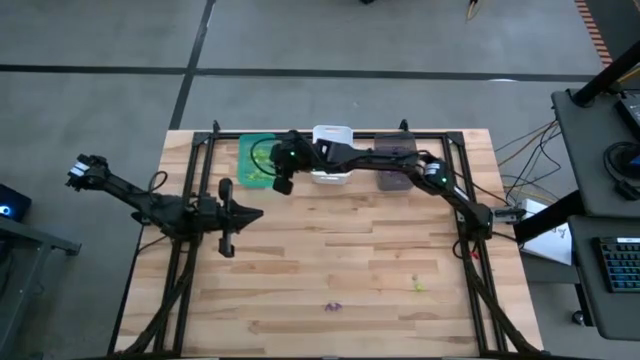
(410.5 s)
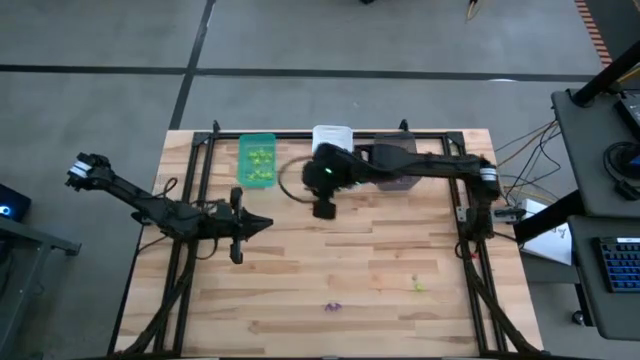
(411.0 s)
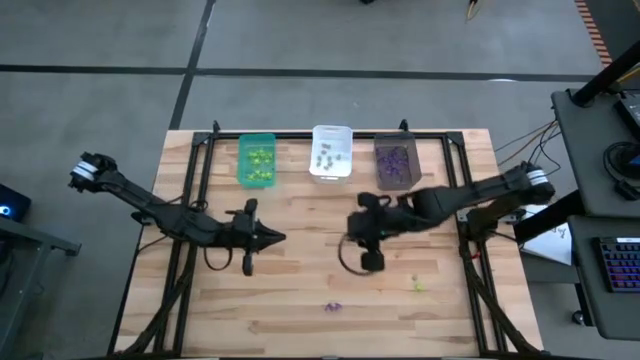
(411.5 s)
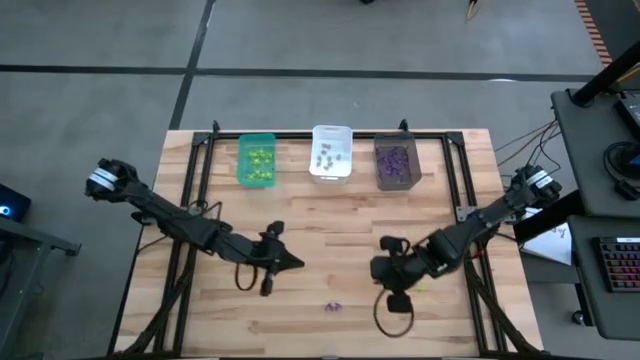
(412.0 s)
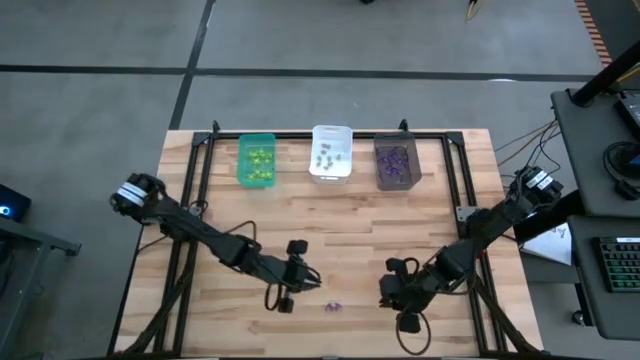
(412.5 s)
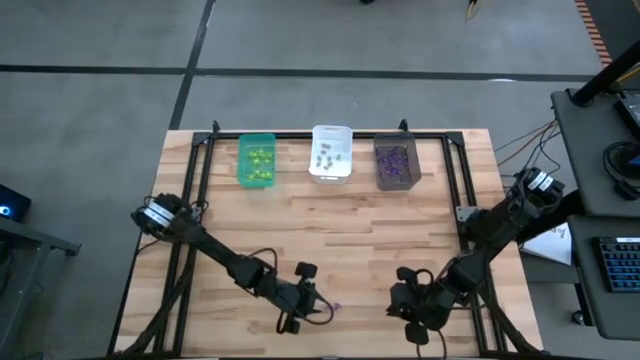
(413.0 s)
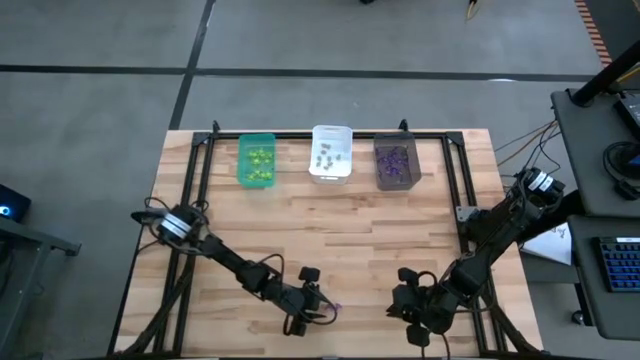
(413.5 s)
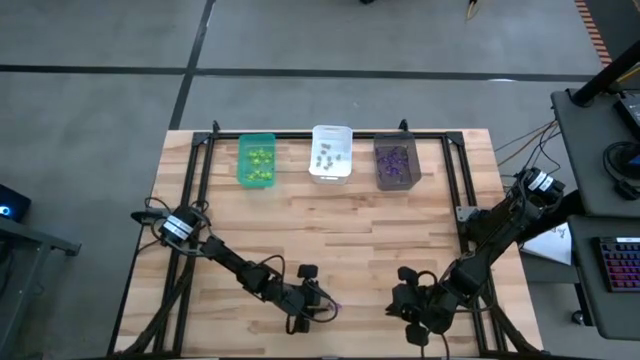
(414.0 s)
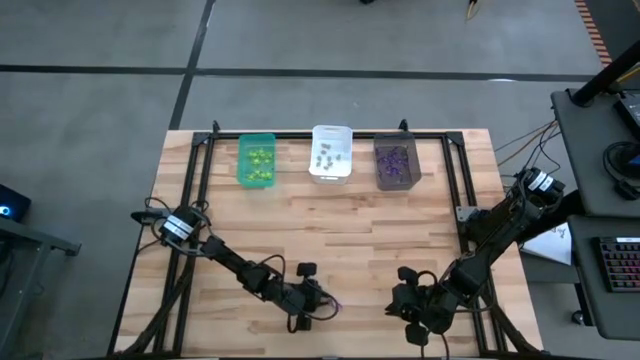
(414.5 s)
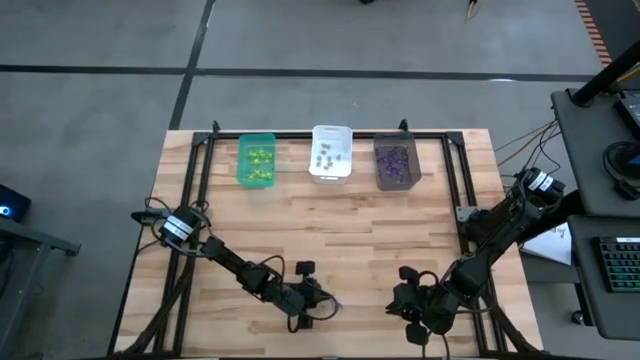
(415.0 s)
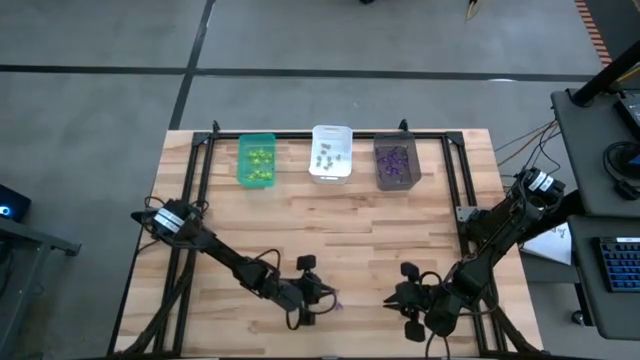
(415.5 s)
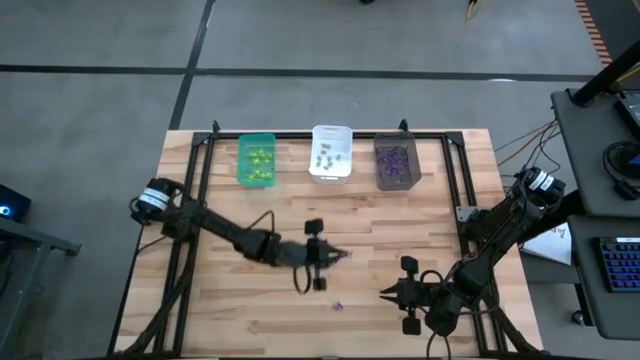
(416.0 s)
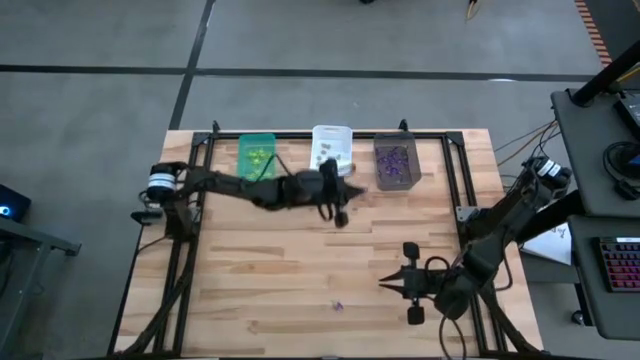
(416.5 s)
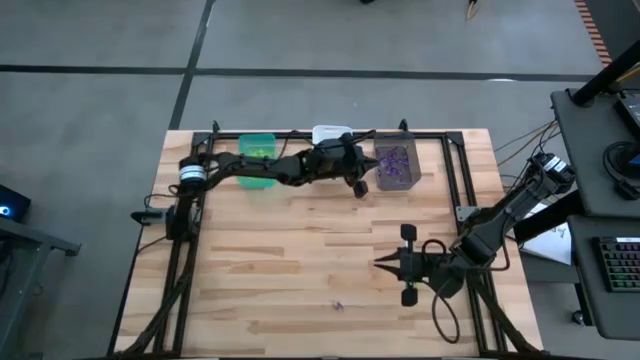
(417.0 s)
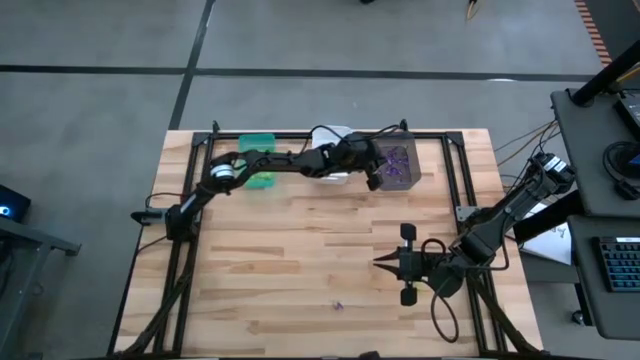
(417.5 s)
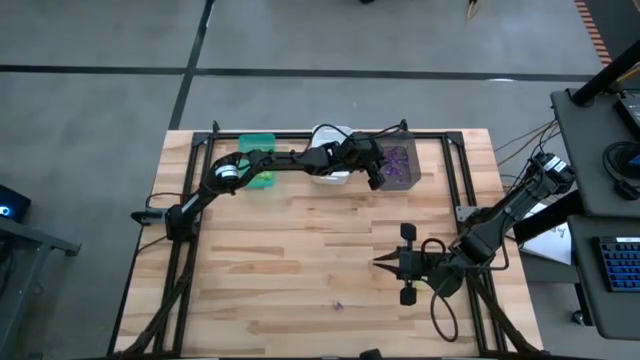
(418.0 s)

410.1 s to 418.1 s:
Task: Sort Halloween decoration
Put the purple witch hat toy into the gray bin

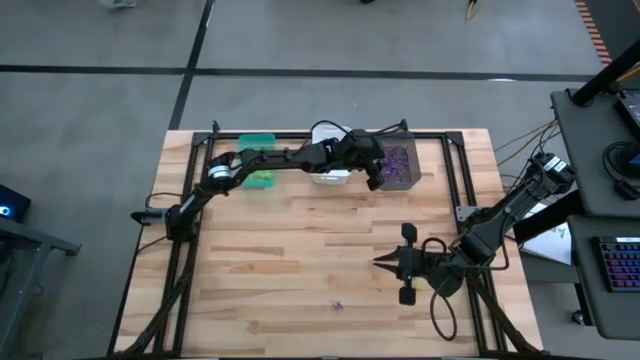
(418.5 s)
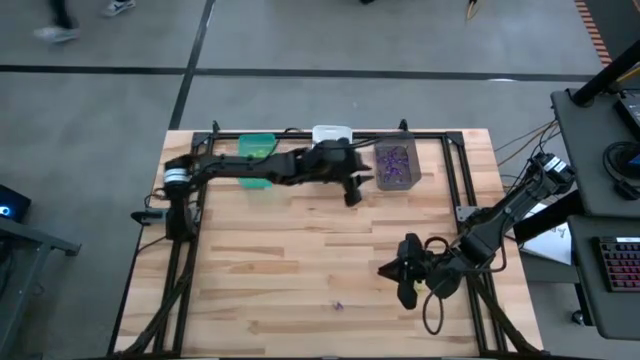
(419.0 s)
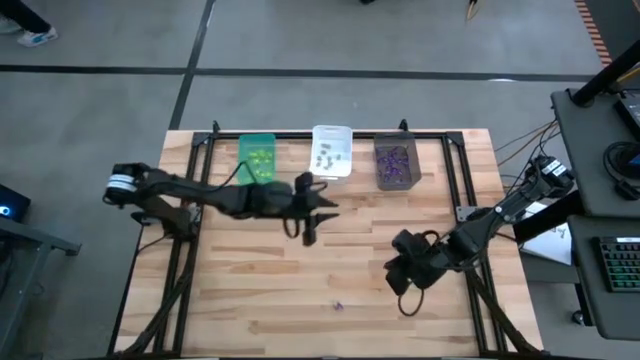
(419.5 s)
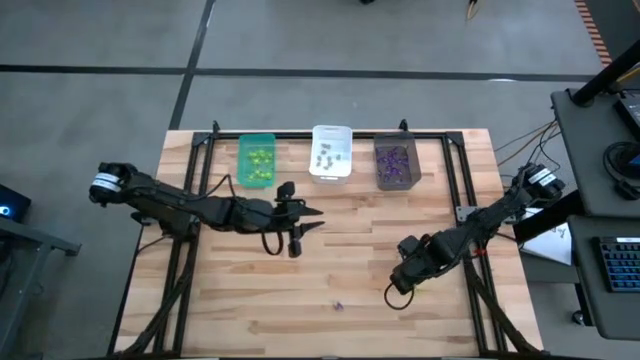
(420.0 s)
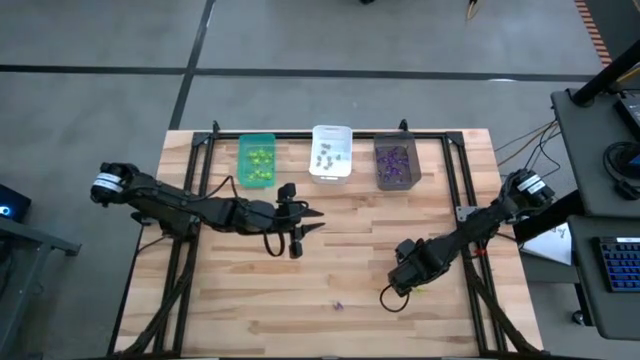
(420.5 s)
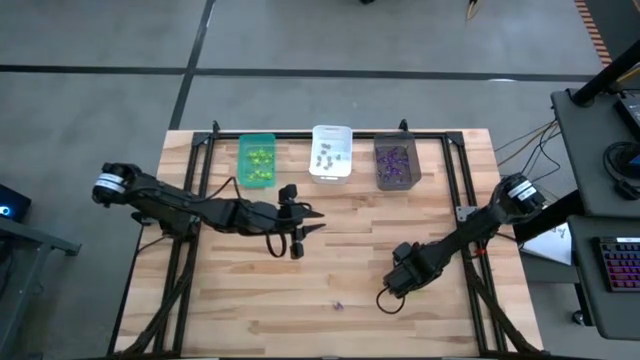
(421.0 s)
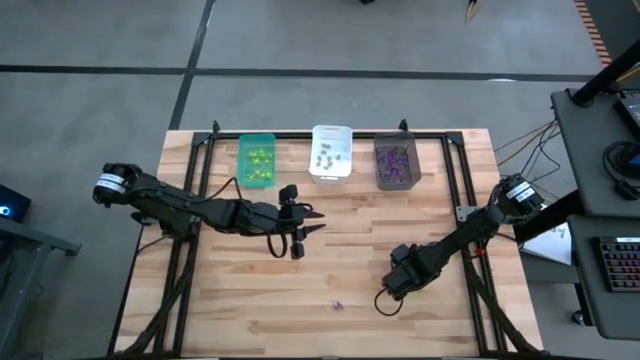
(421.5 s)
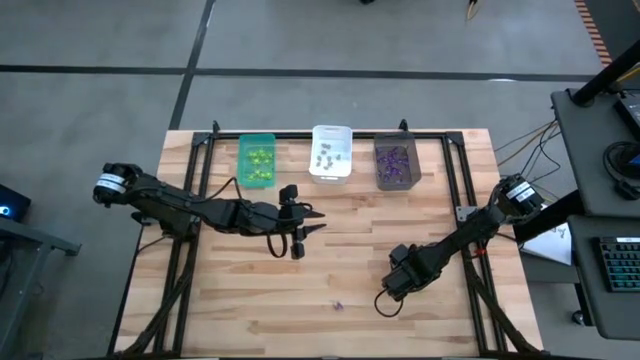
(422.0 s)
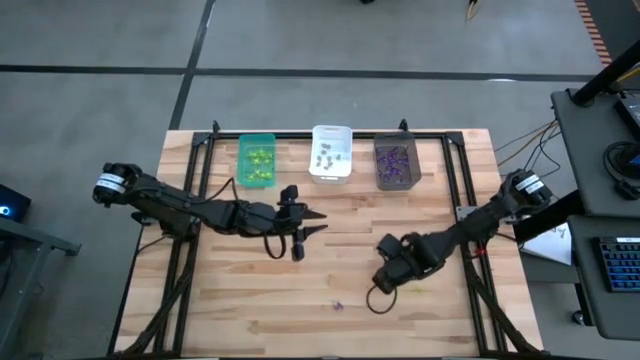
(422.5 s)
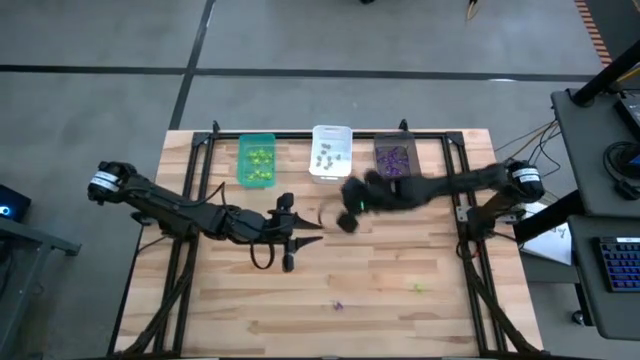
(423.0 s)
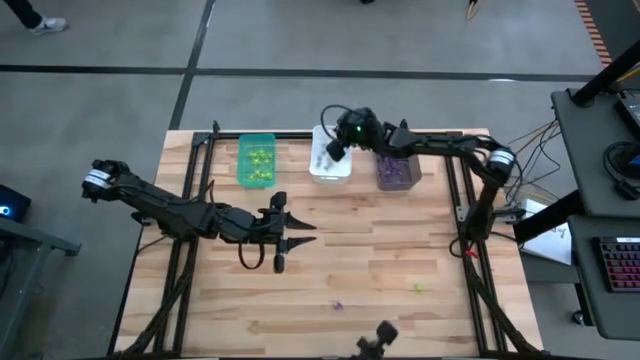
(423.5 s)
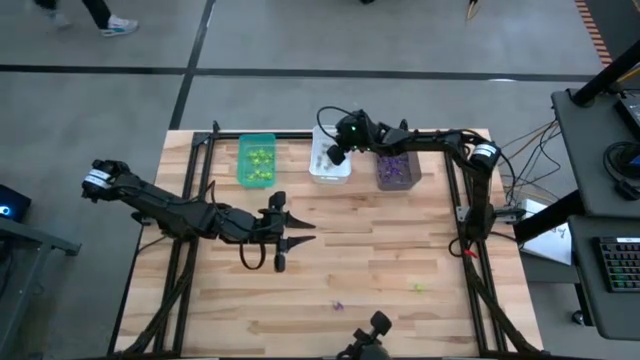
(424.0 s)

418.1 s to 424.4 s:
Put the white skull toy into the white bin

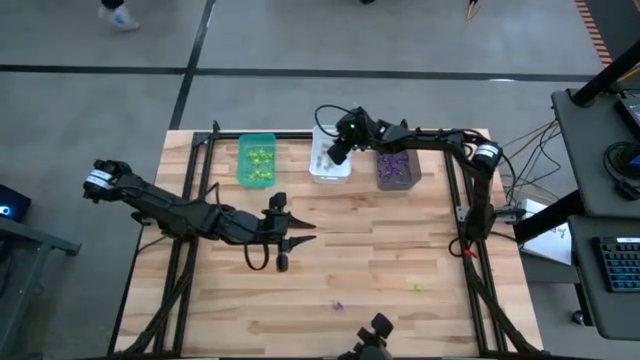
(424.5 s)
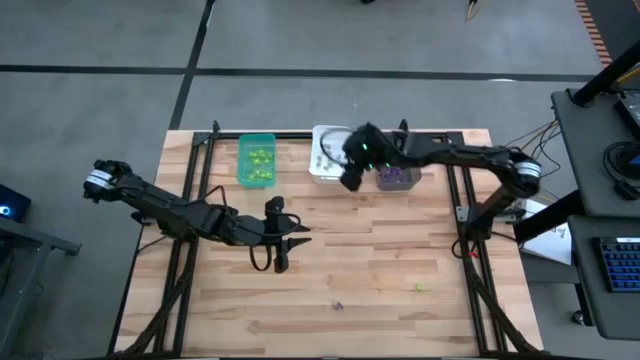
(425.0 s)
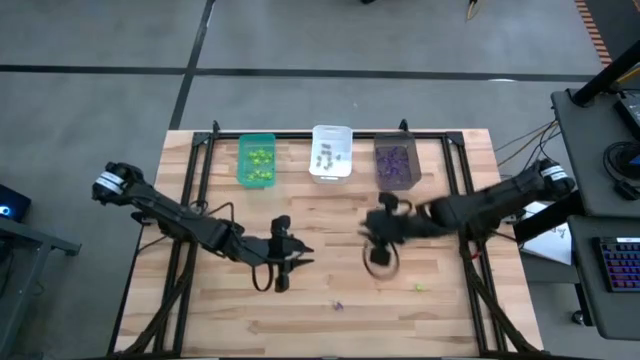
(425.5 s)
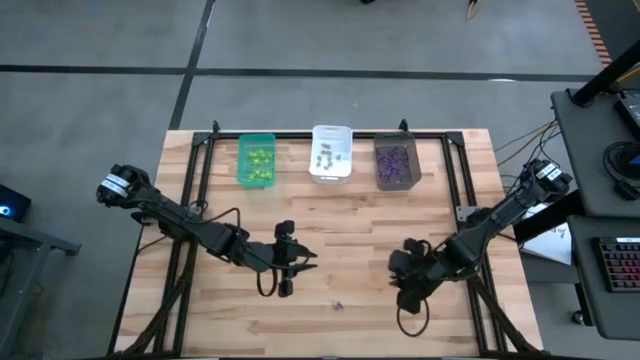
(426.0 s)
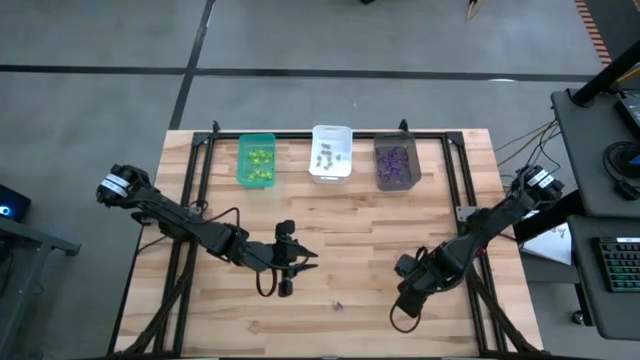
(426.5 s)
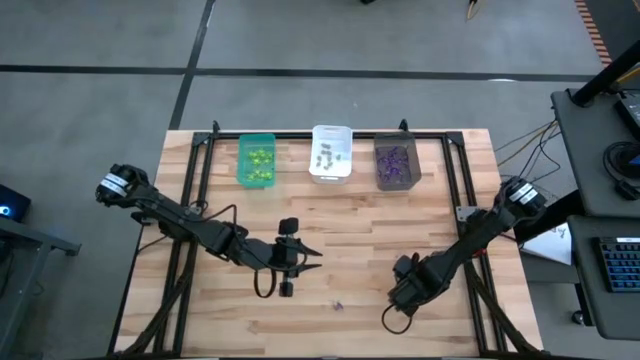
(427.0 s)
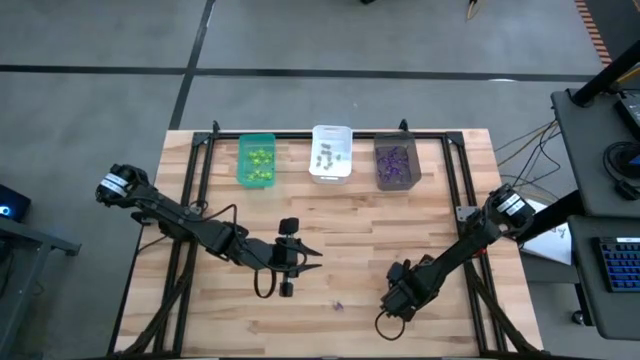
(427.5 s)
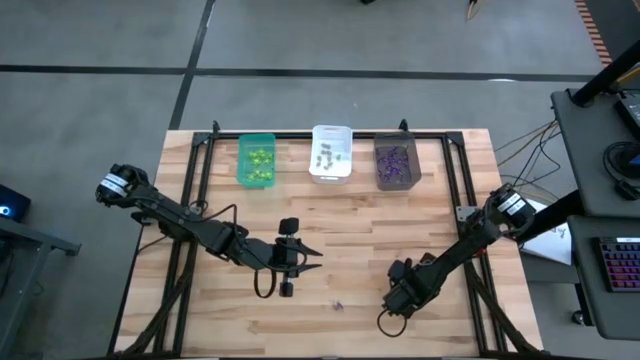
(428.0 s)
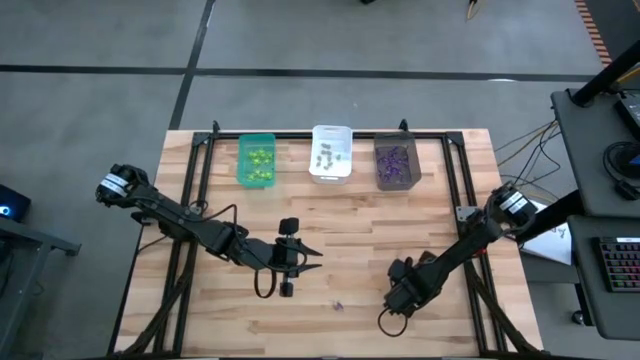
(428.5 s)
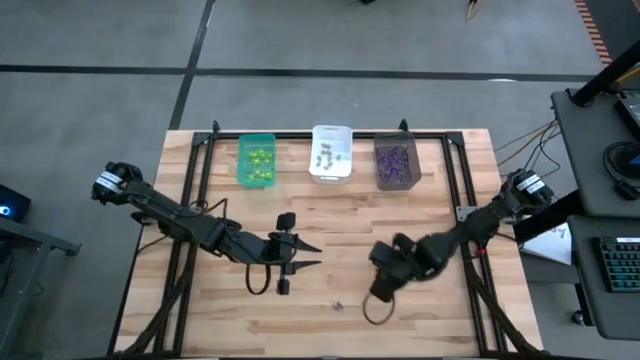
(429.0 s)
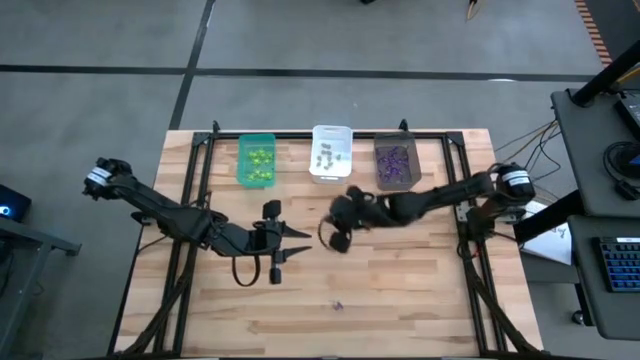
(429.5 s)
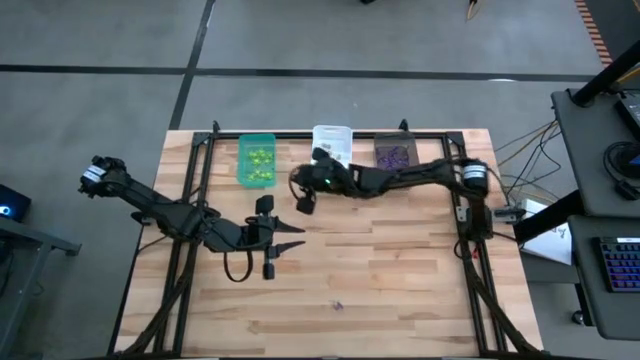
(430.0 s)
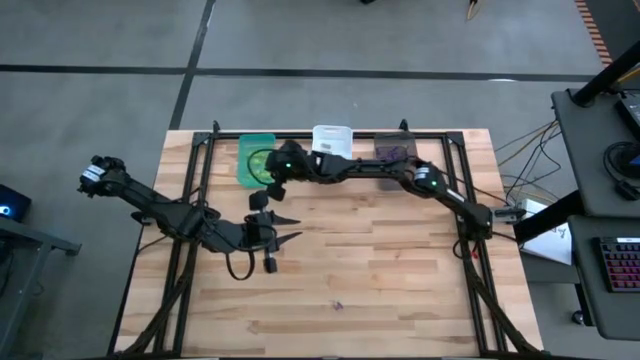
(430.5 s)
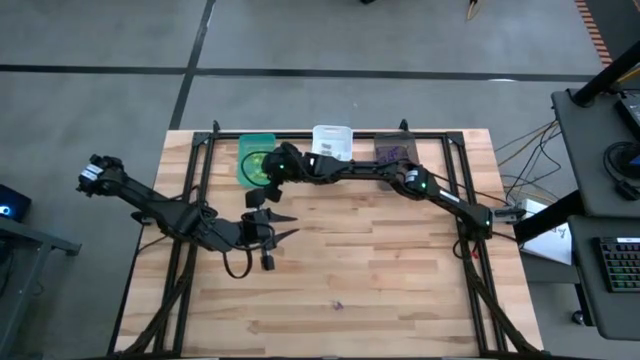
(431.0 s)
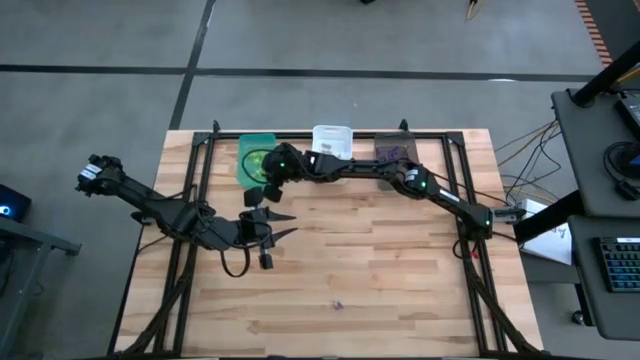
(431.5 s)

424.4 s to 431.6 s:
Put the green spider toy into the blue bin
